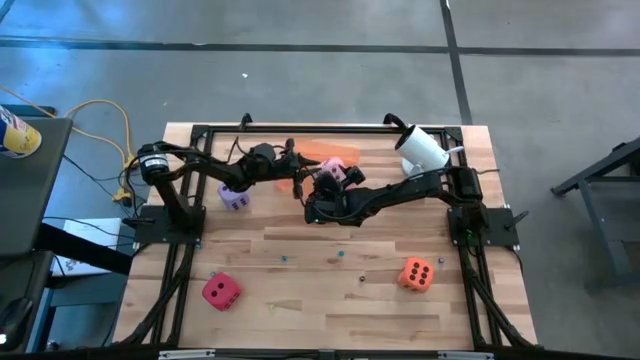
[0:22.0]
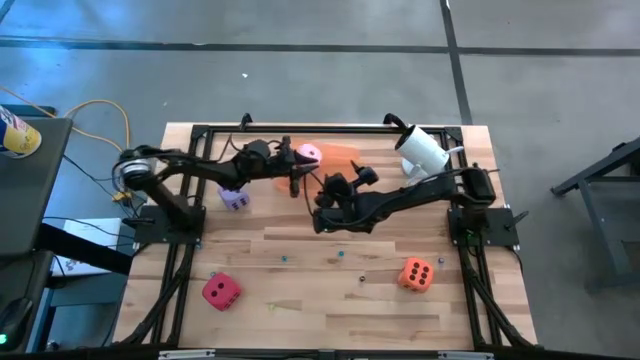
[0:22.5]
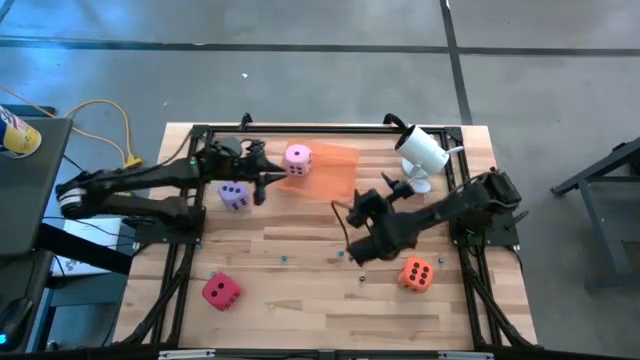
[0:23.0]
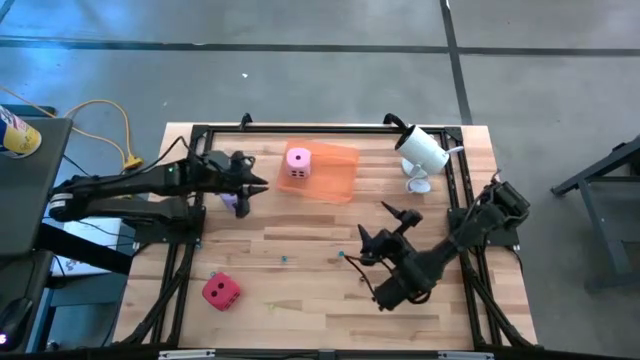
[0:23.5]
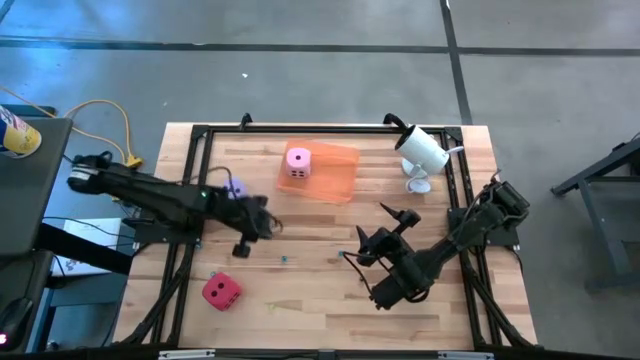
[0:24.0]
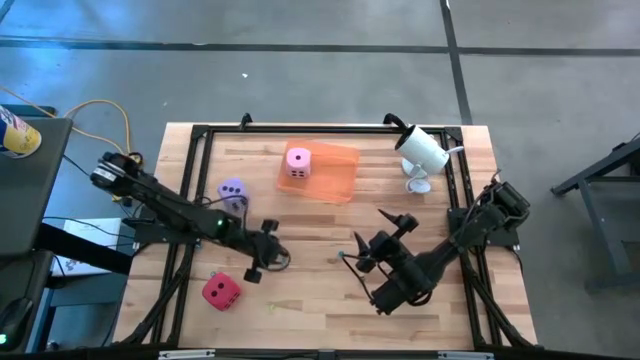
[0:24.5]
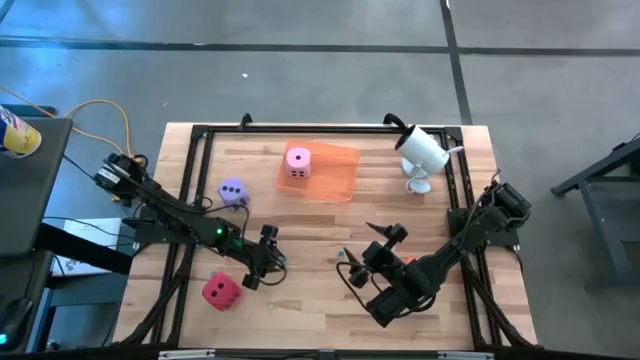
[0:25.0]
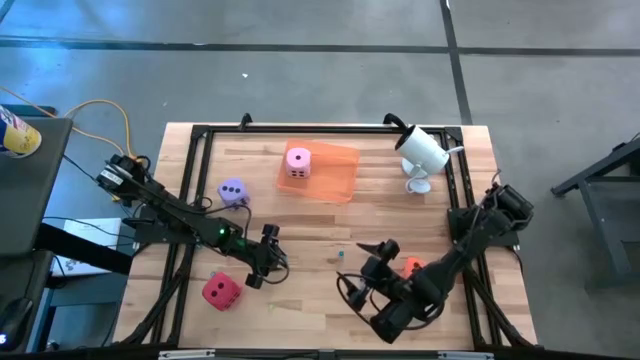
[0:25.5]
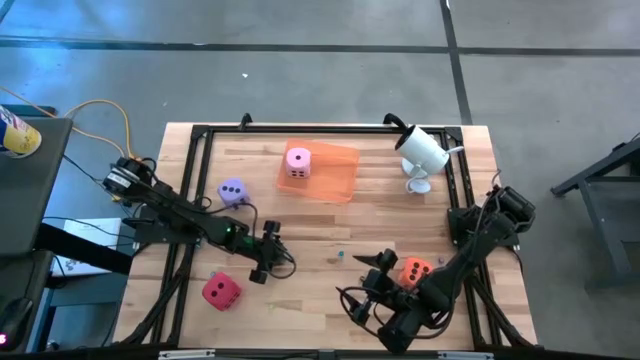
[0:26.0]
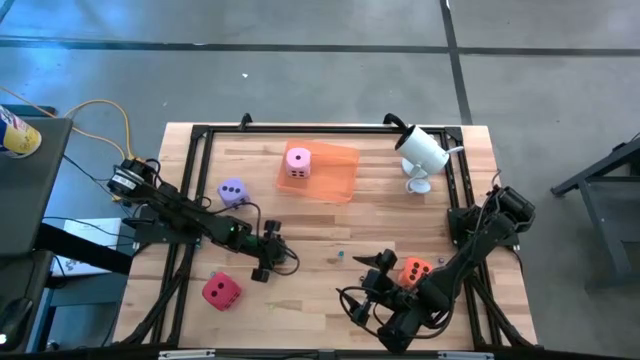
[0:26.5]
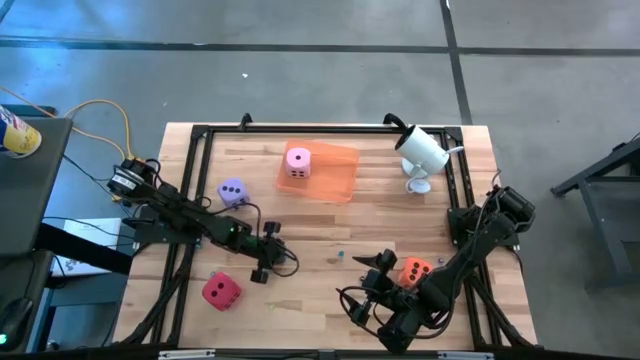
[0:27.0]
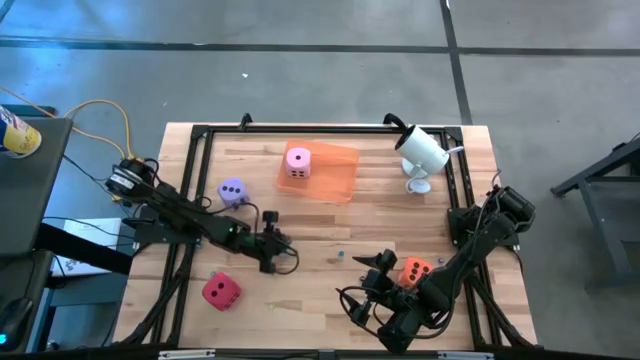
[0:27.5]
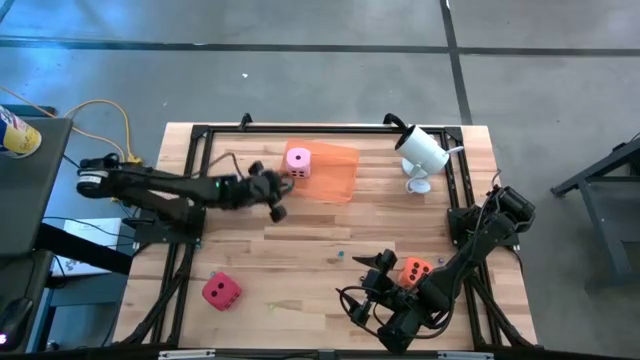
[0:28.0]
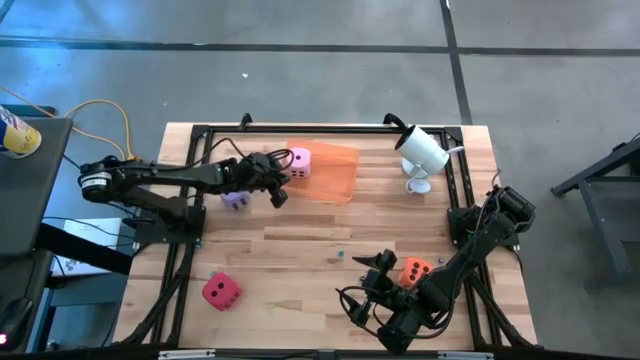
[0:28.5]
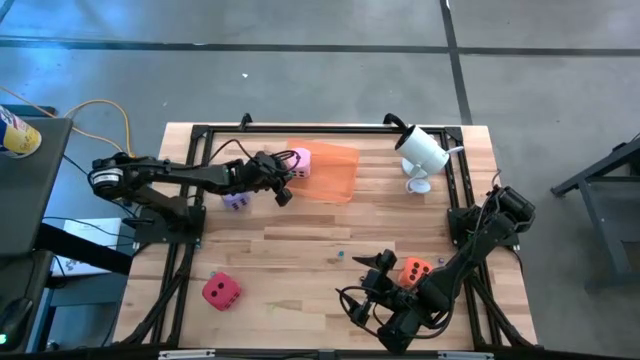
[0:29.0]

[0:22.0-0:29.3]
Task: Pick & Place Dice
Put the small blue die into the orange bin

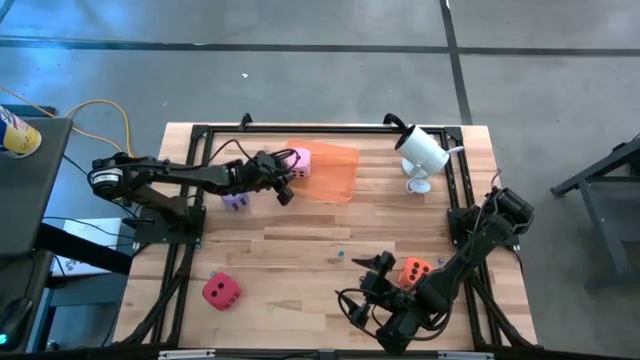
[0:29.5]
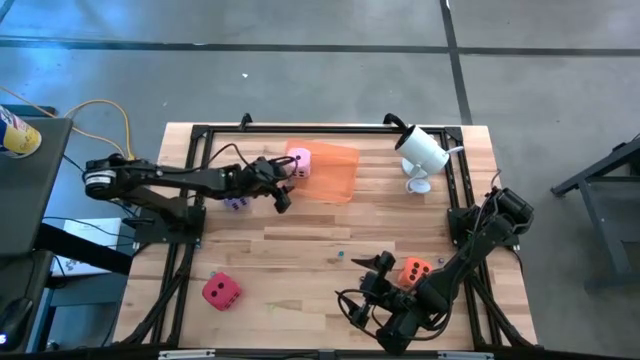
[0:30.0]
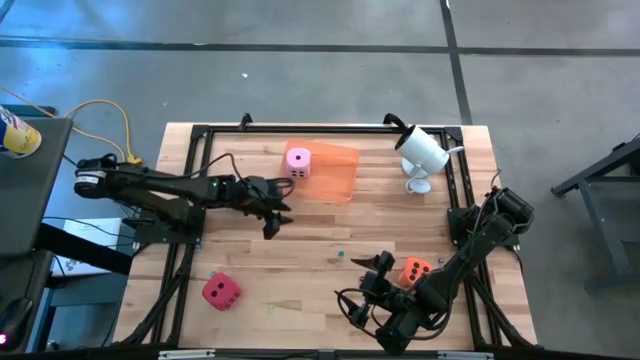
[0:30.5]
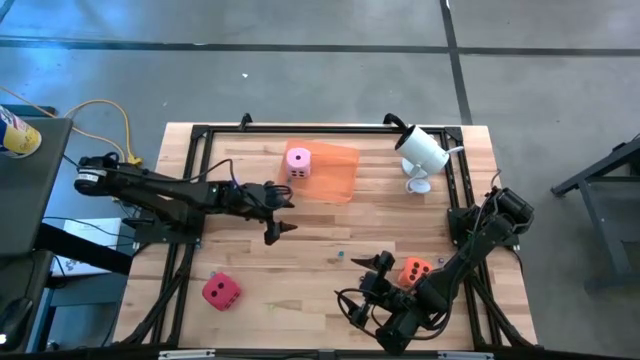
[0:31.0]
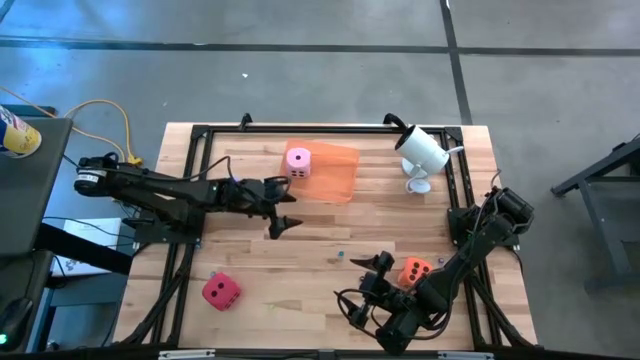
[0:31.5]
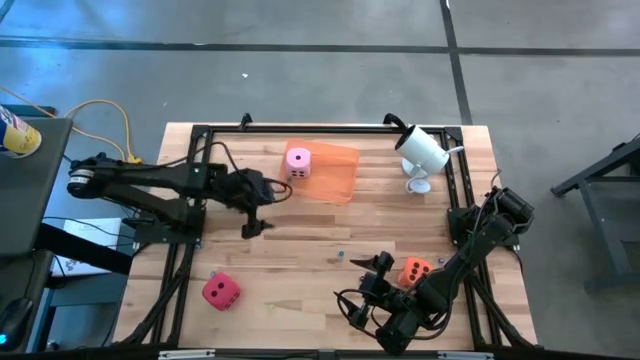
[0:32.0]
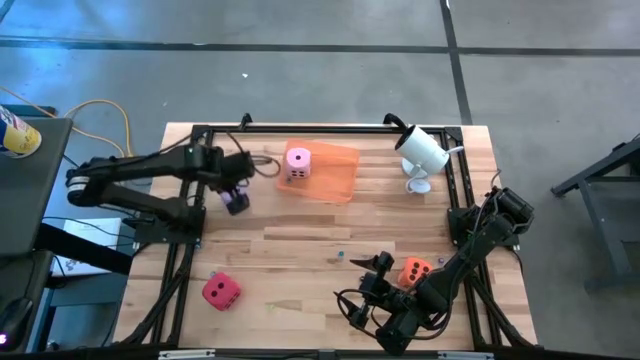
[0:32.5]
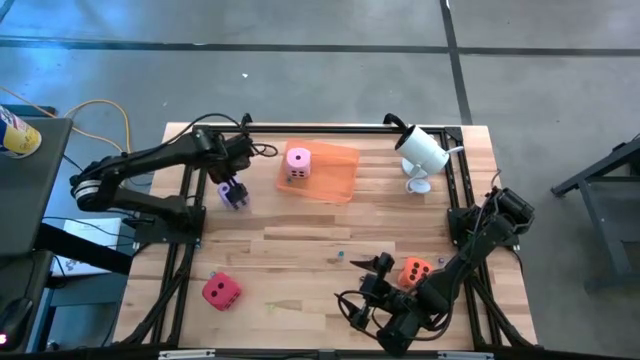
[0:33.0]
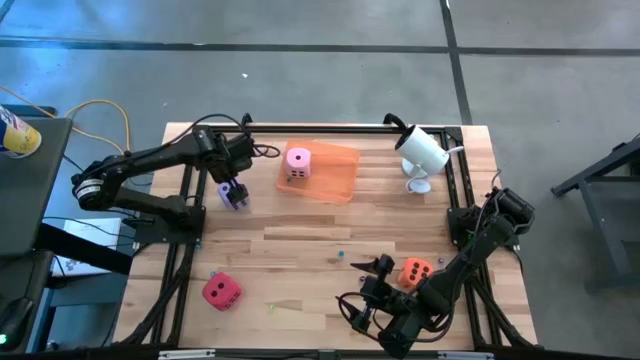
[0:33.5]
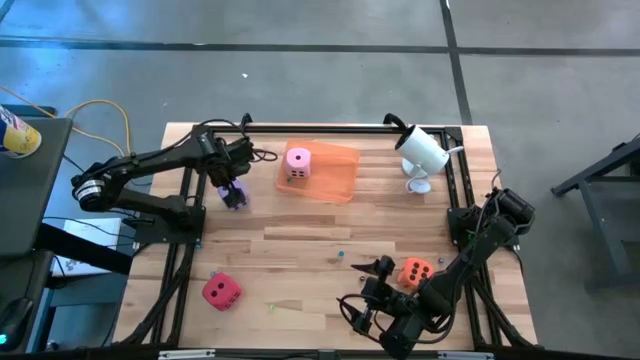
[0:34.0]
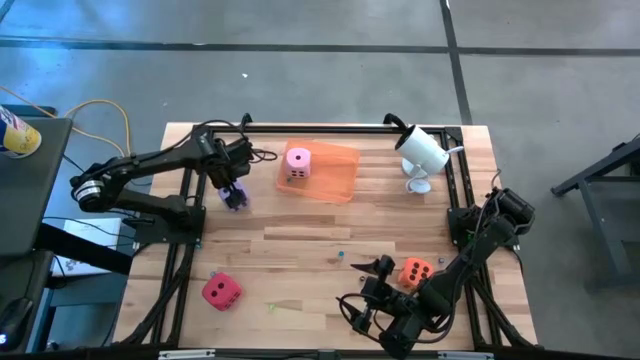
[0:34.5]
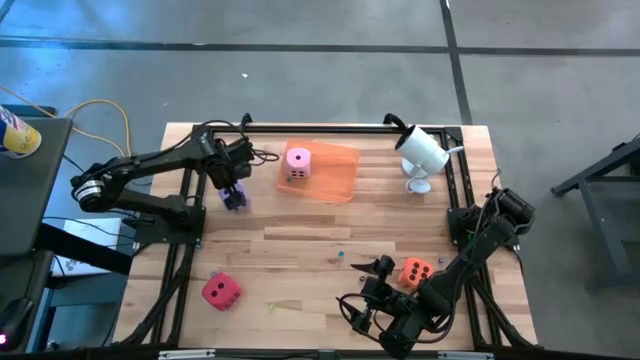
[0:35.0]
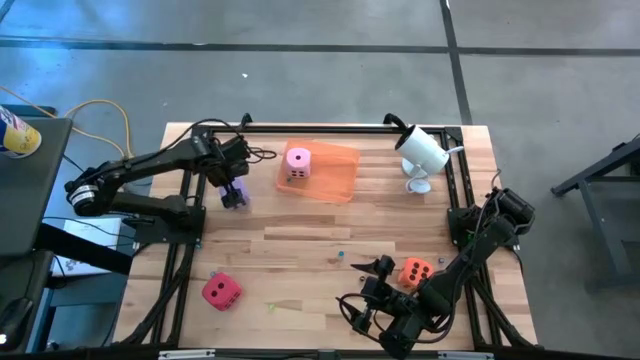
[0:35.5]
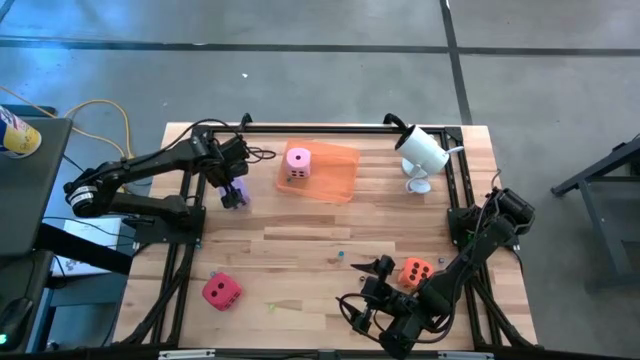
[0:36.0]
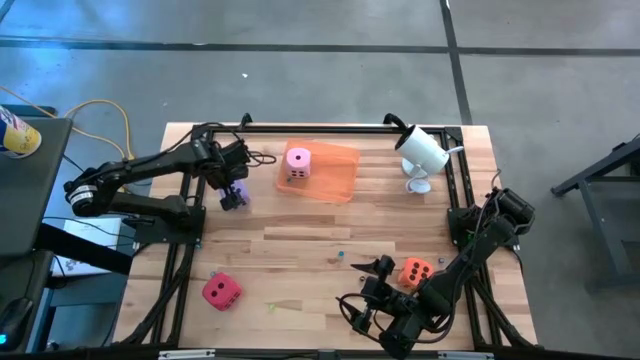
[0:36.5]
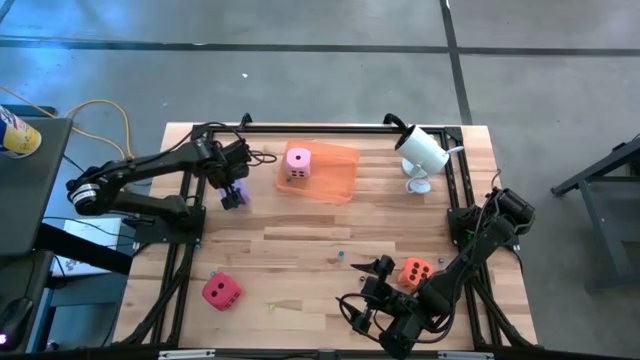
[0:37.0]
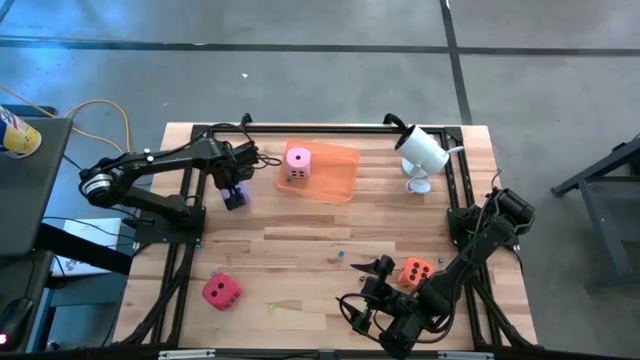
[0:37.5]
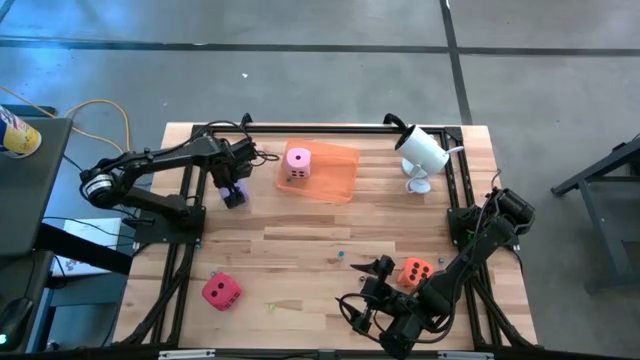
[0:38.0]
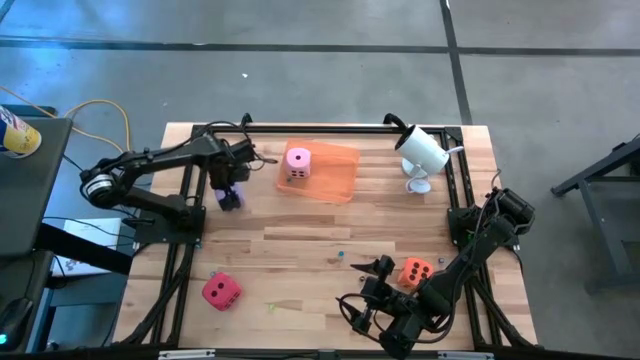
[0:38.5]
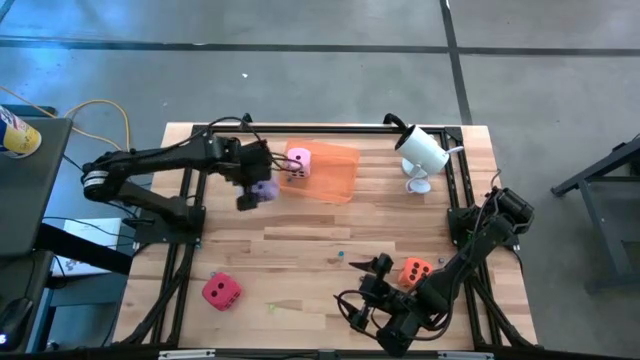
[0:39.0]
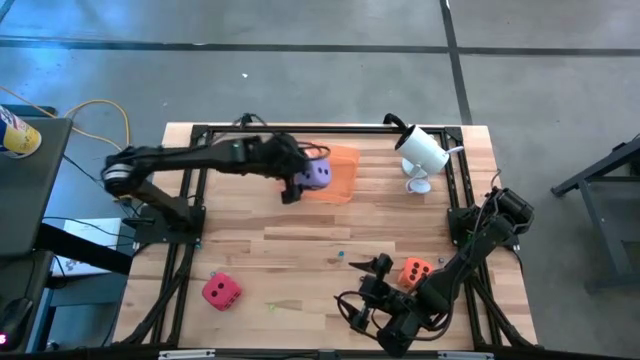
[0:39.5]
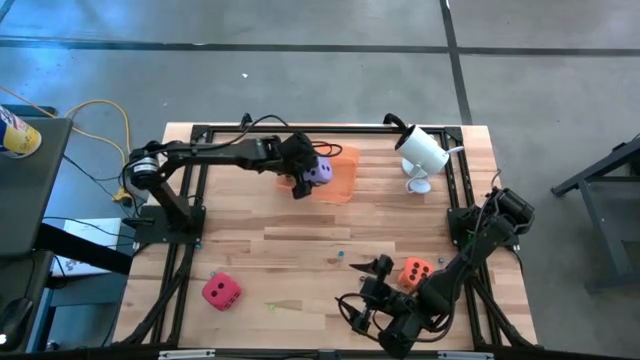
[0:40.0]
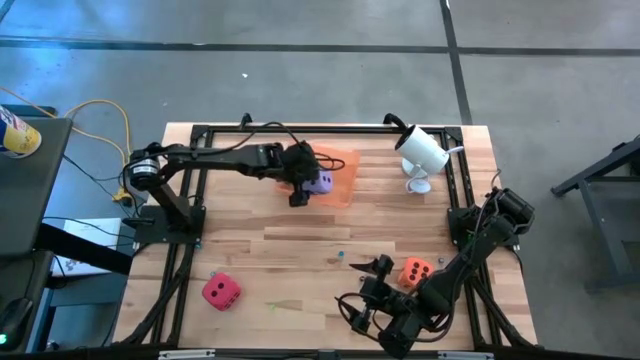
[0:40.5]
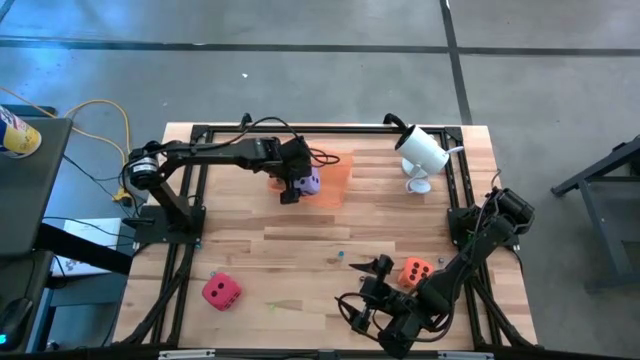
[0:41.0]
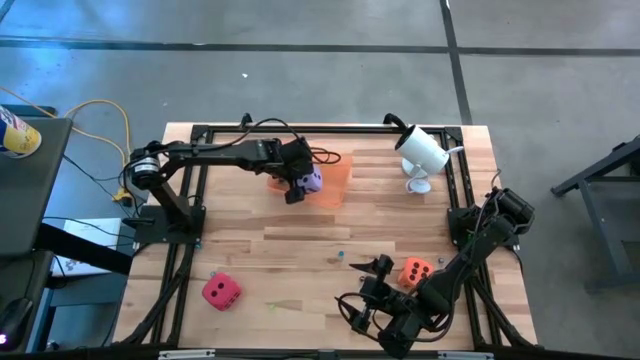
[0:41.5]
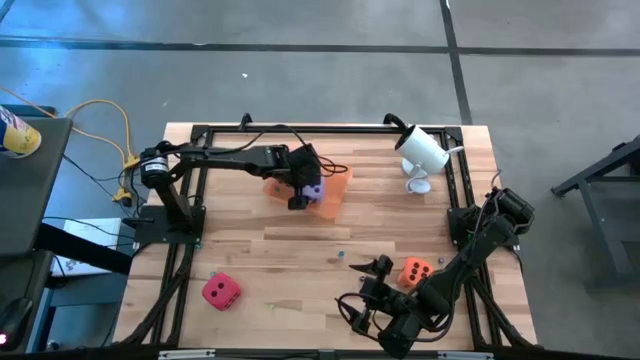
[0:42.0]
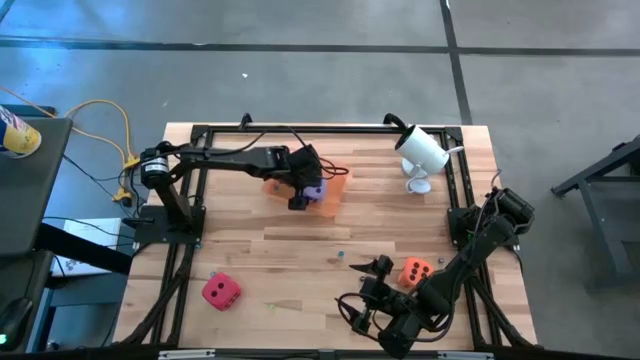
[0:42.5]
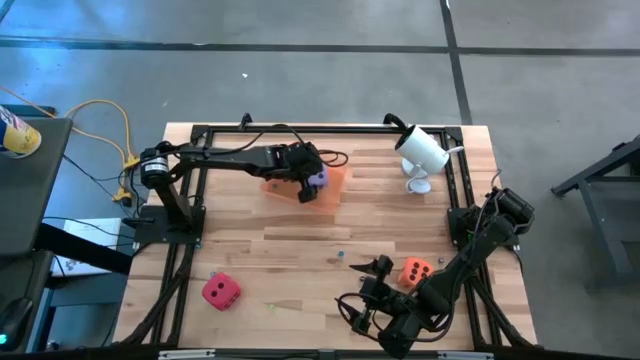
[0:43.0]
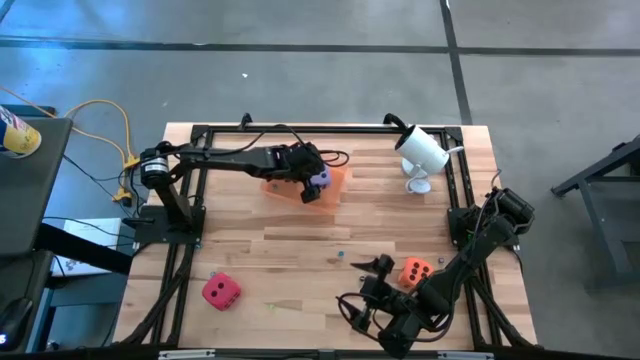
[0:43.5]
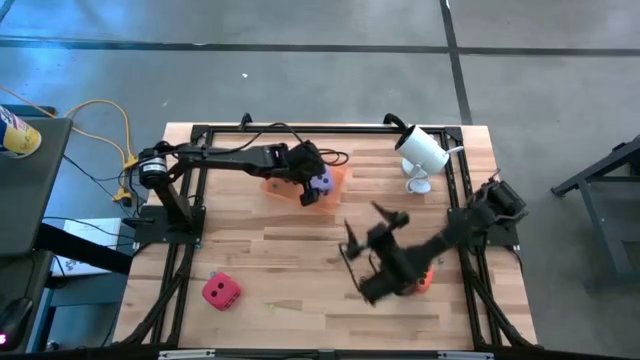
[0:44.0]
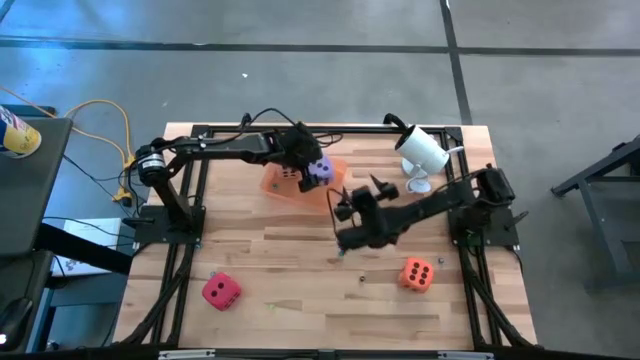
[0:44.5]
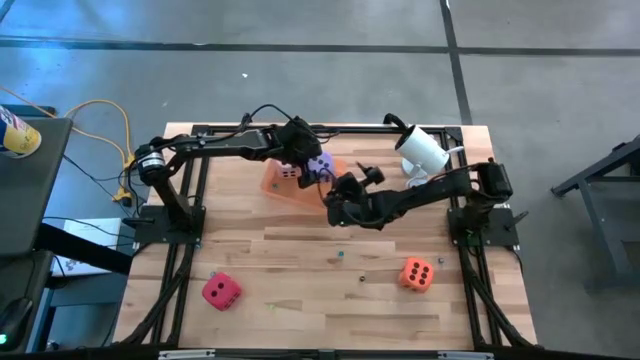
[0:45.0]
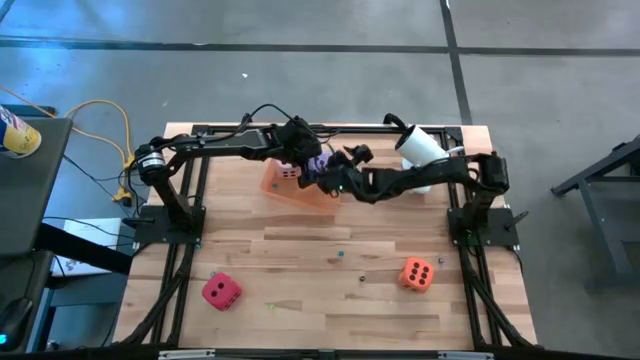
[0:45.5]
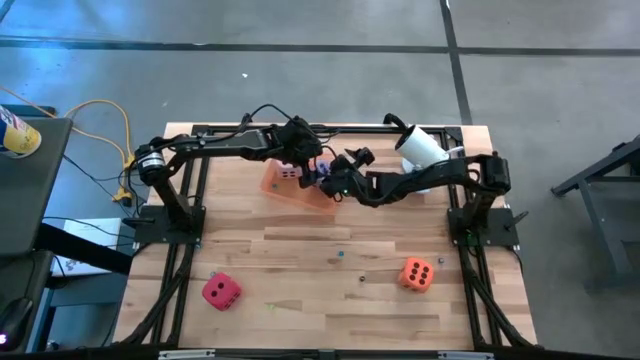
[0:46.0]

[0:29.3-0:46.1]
Put the large purple die into the orange bin
